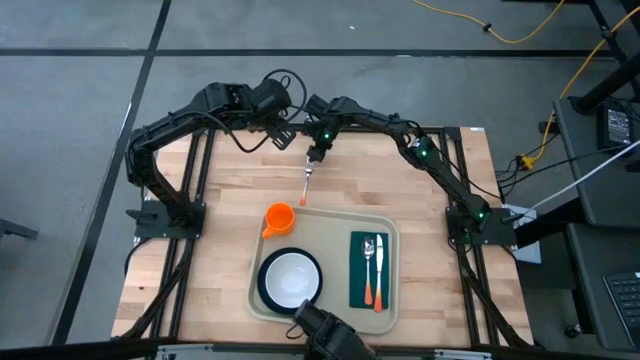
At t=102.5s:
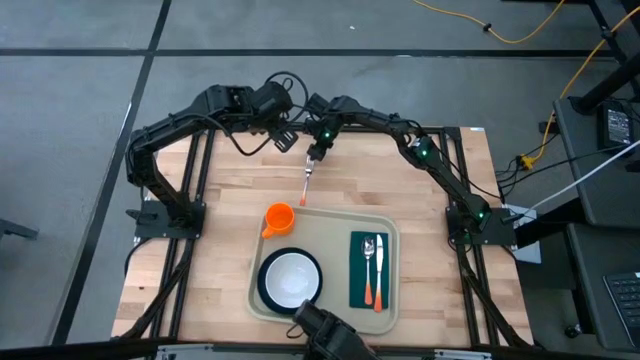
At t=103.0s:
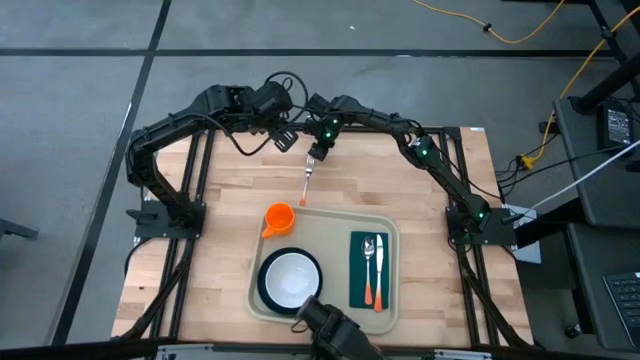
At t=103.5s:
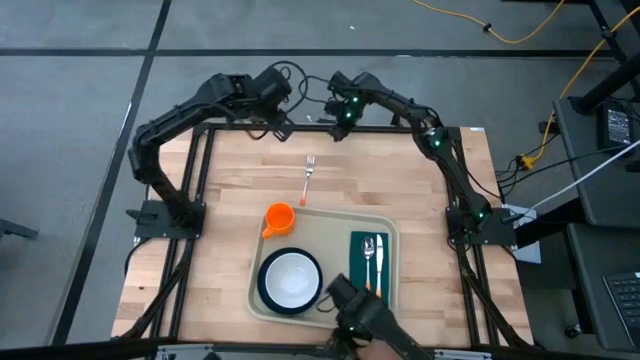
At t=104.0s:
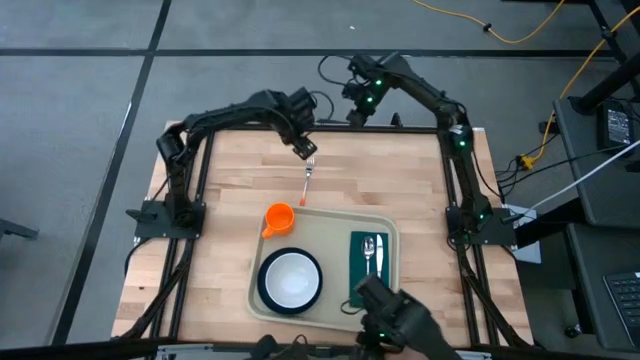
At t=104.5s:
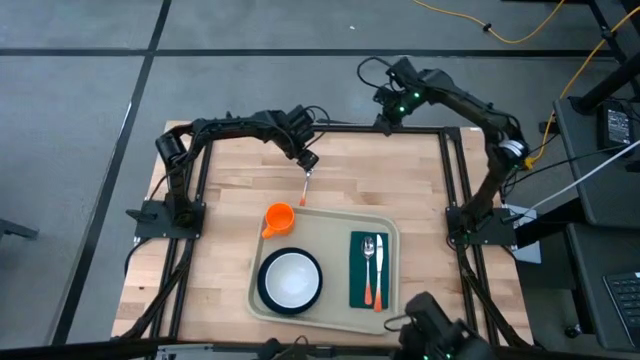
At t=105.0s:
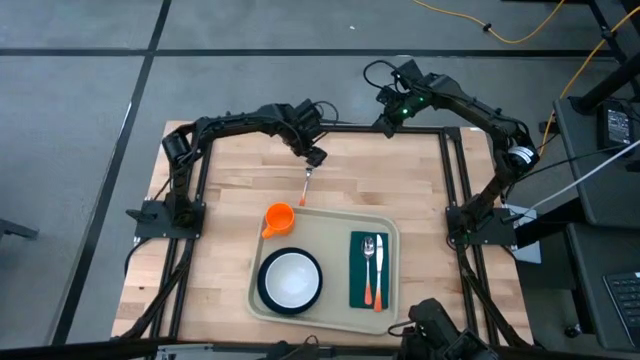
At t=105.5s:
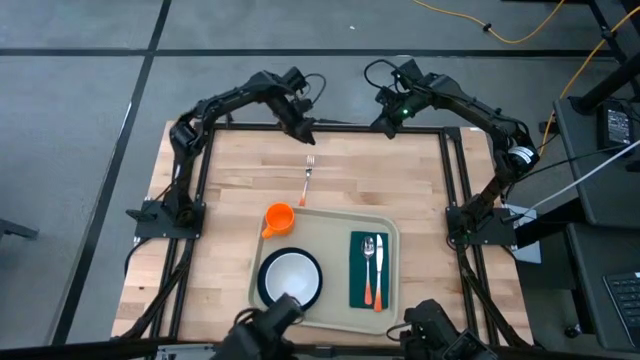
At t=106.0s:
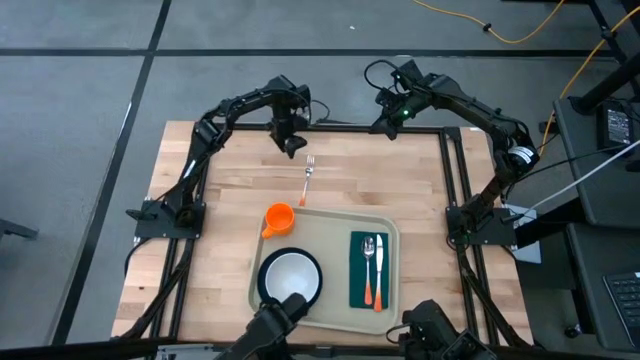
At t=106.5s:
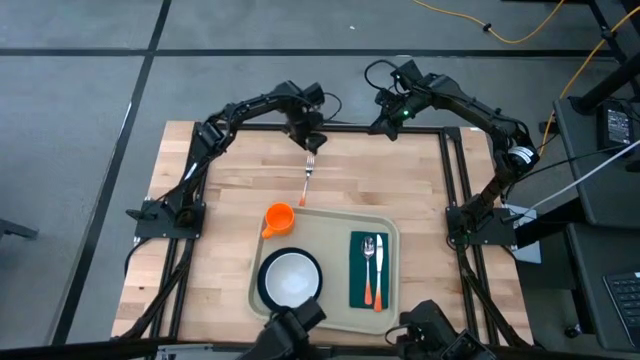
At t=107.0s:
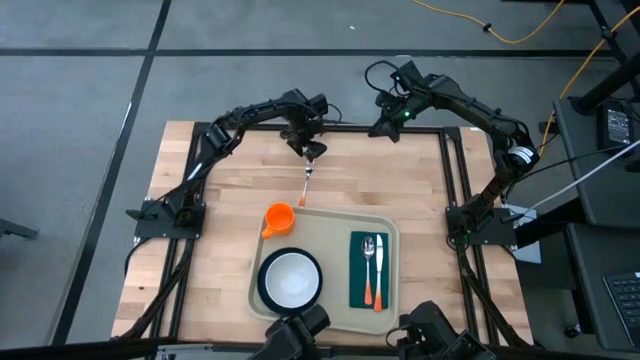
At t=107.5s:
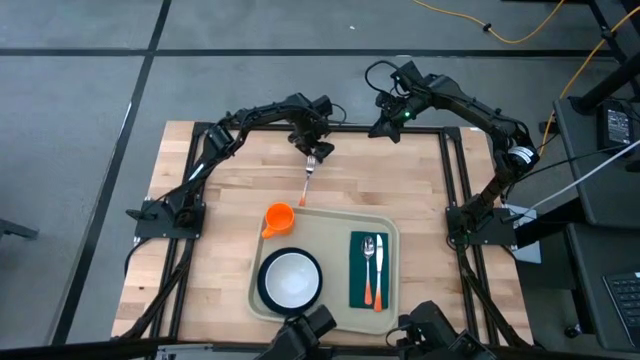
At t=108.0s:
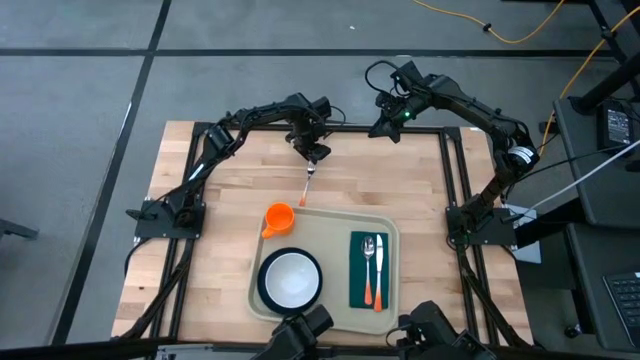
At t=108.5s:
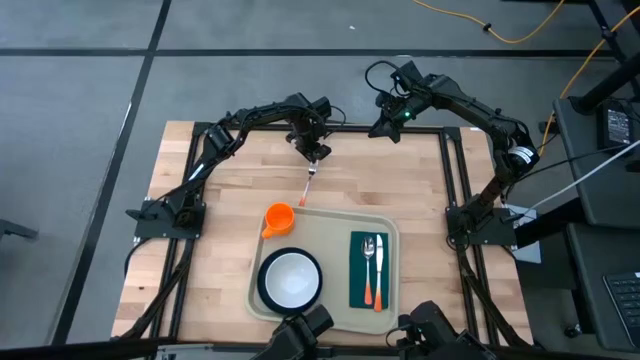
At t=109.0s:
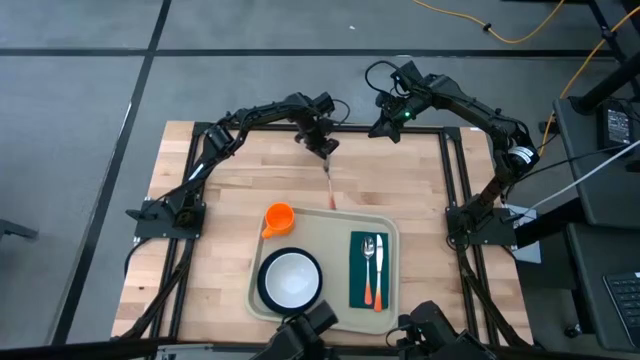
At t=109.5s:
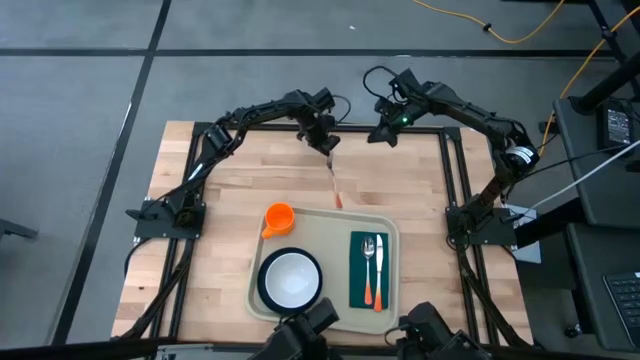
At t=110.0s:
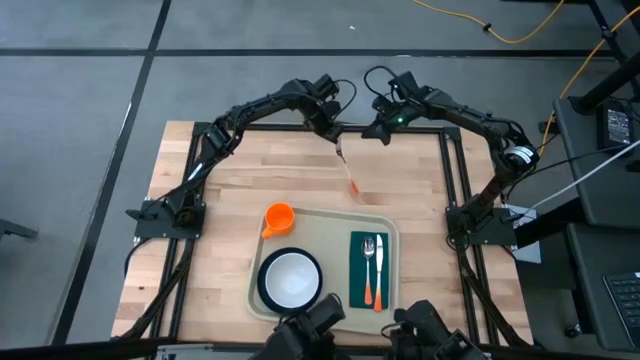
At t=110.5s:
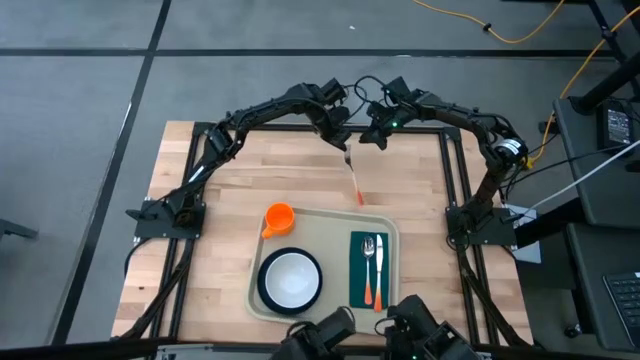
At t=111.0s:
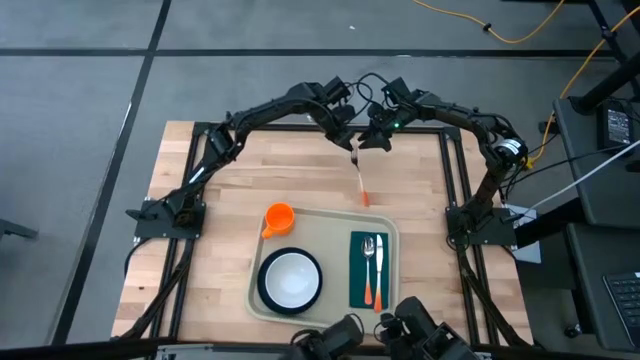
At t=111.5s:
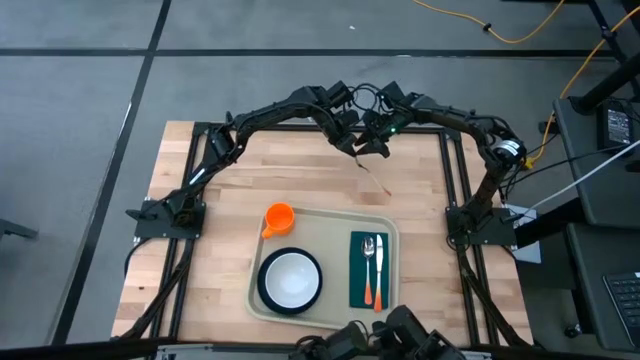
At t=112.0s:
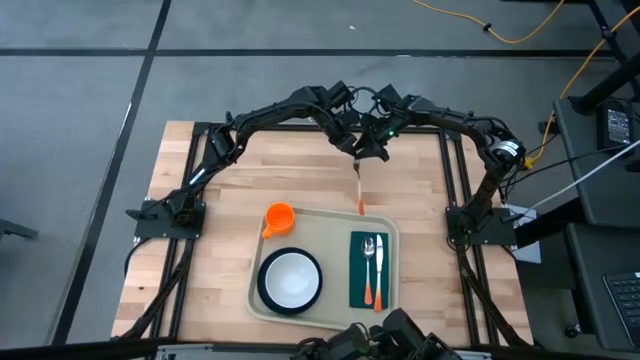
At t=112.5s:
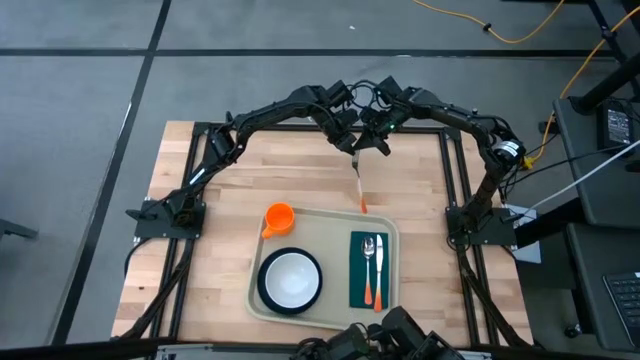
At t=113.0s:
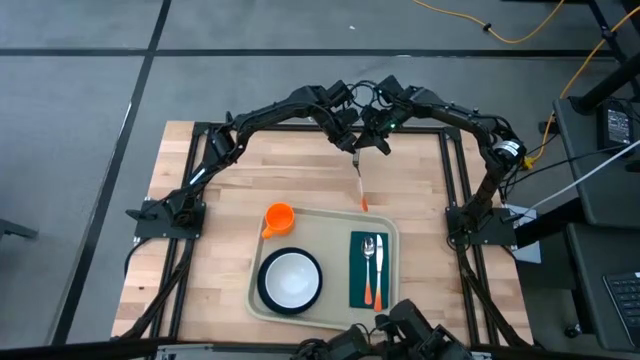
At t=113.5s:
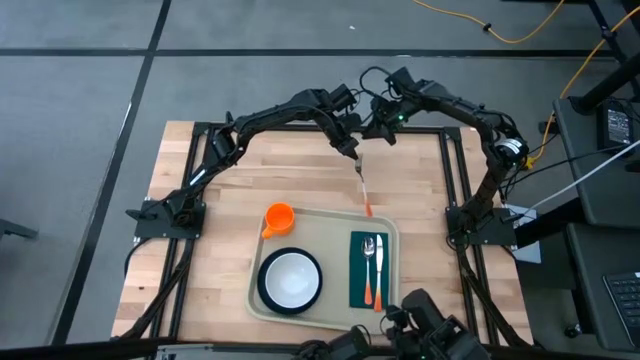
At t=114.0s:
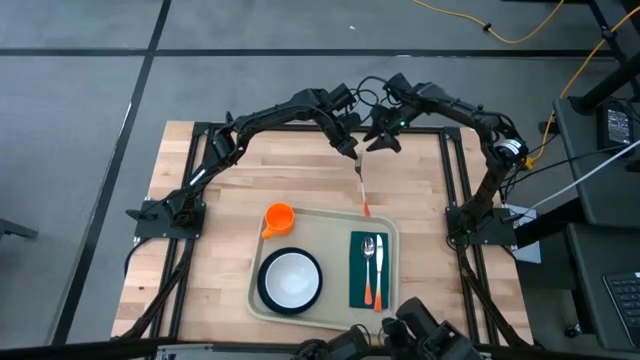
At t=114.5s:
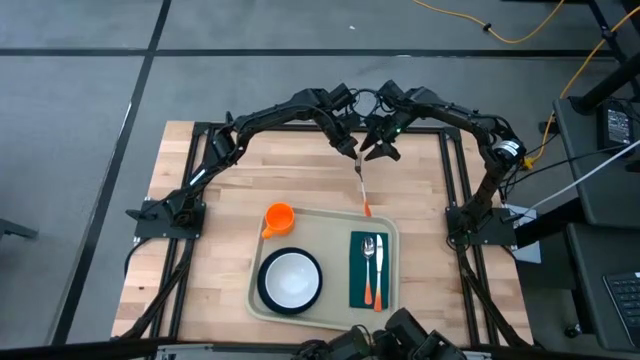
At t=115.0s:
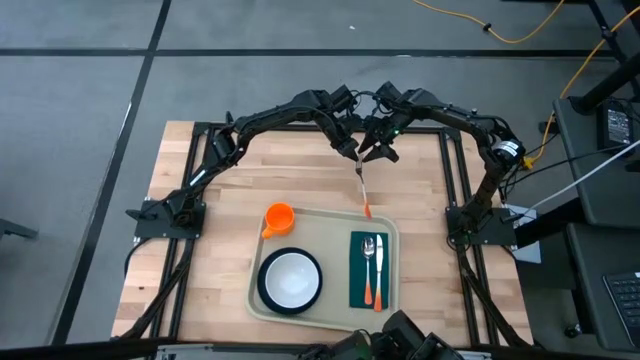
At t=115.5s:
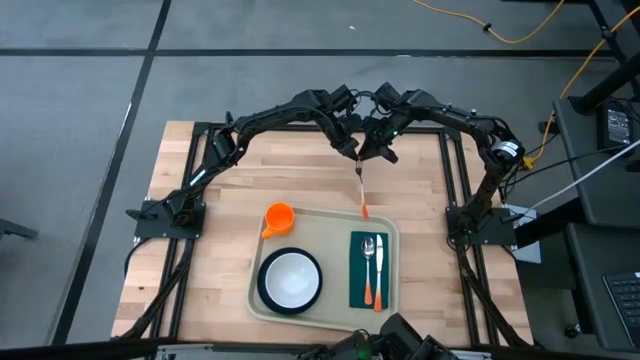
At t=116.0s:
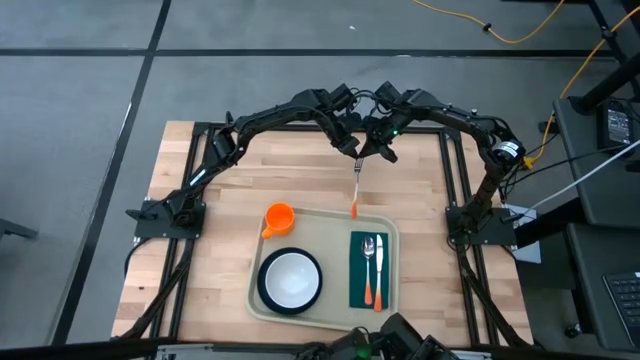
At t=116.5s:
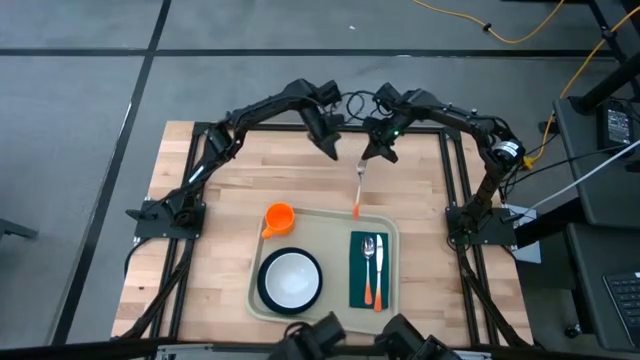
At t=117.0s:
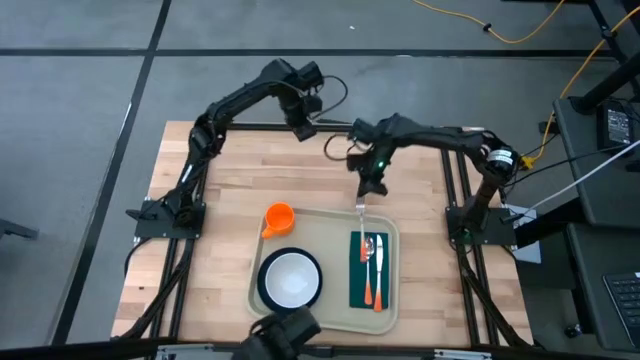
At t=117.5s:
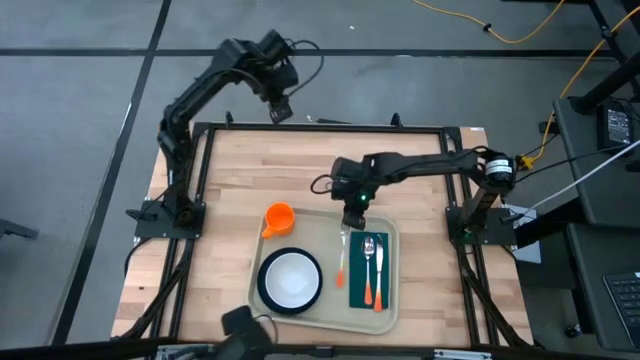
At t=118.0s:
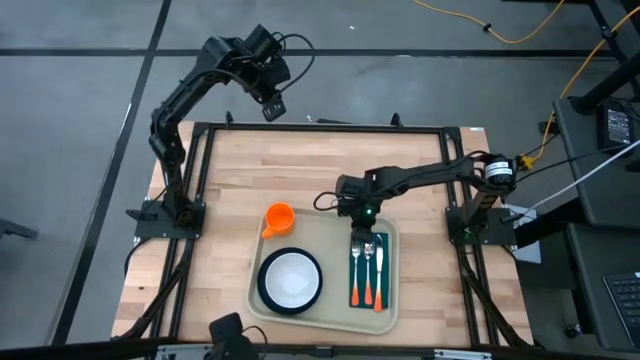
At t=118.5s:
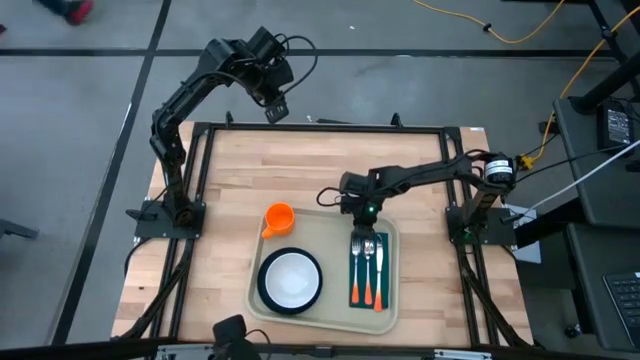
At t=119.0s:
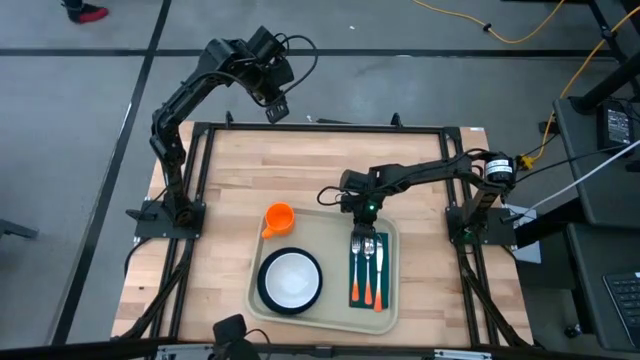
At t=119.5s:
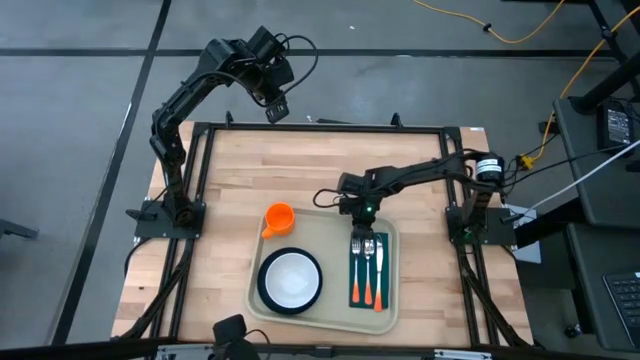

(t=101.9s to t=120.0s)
Task: Set up tray
Put the orange fork on the dark green napkin to the left of the orange spoon

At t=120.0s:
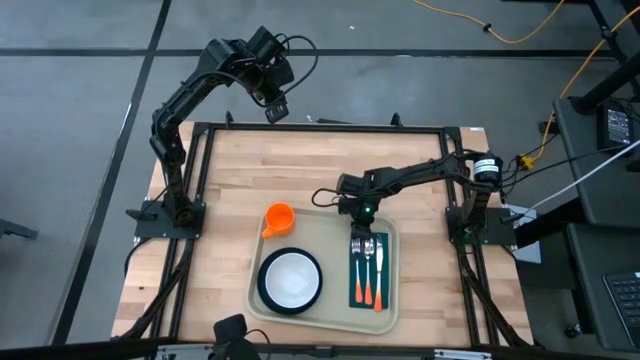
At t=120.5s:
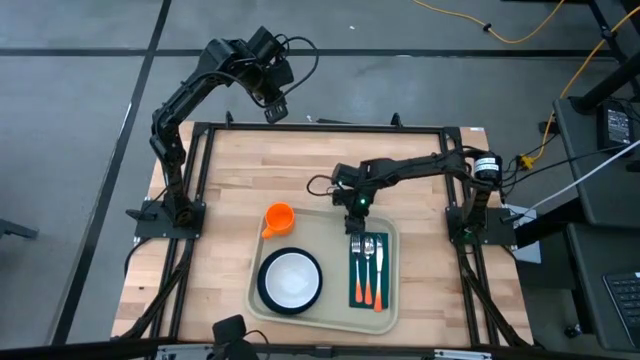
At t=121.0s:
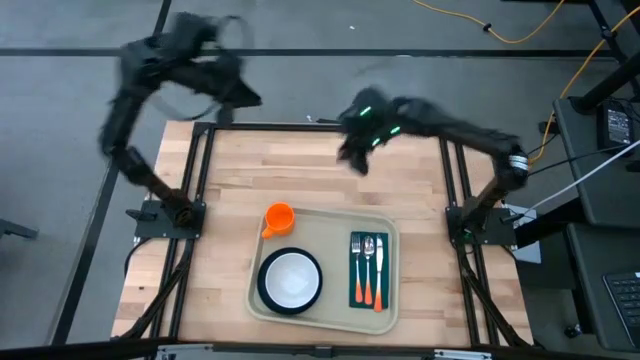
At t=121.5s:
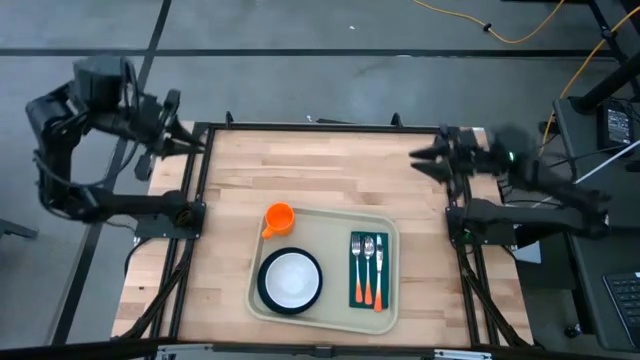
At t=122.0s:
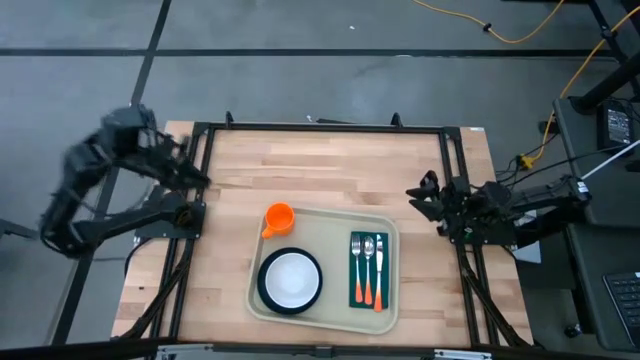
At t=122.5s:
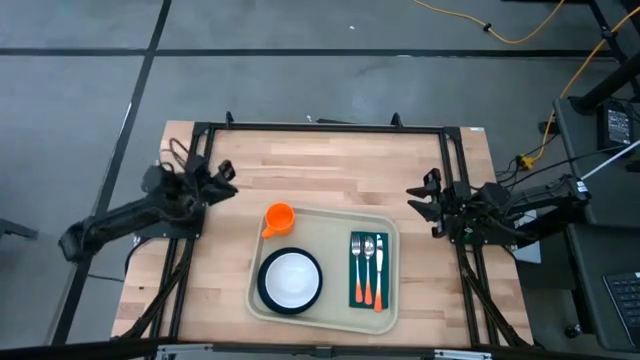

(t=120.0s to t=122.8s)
Return to Home Position

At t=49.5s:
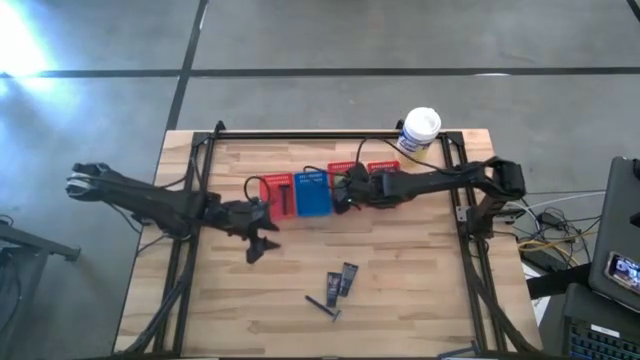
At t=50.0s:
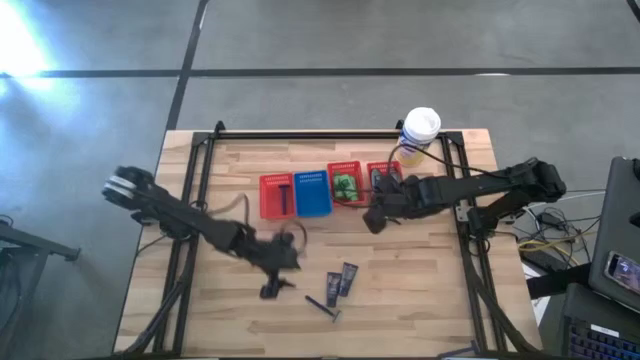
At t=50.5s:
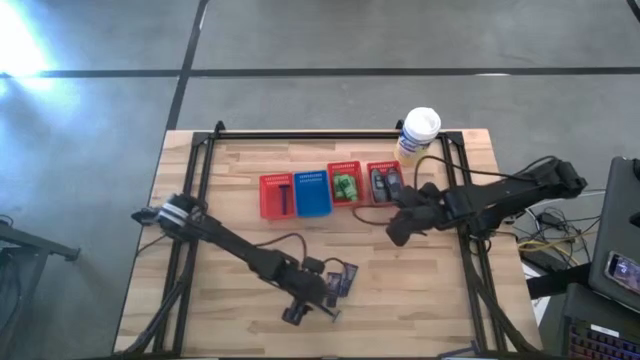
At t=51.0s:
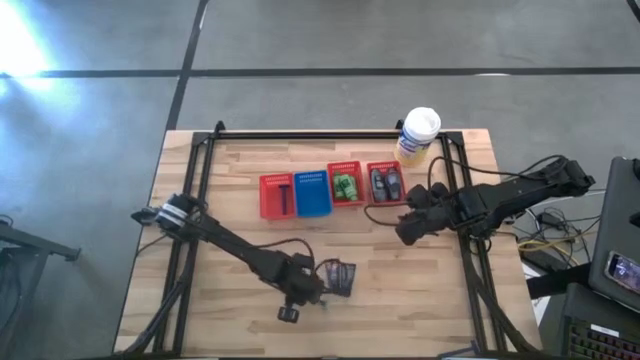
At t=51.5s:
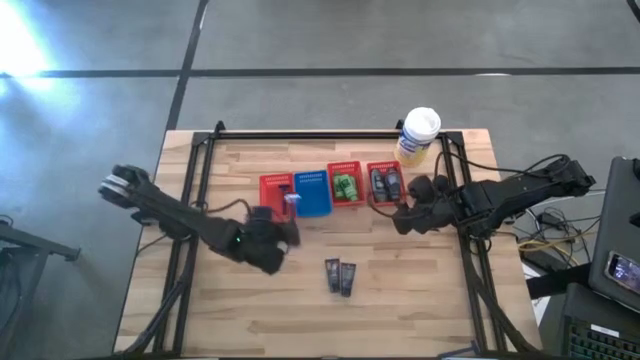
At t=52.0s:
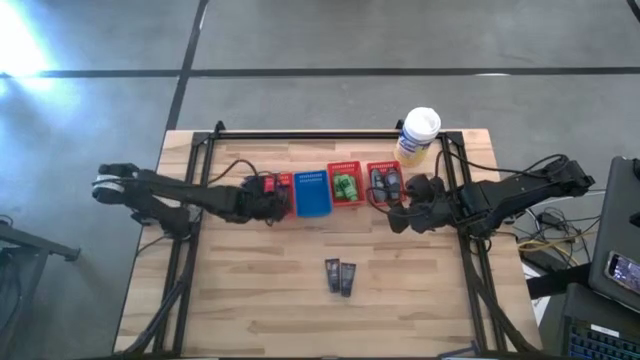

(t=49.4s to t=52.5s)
Task: Pick & Place Travel size toiletries
Put the blue razor into the left red bin
